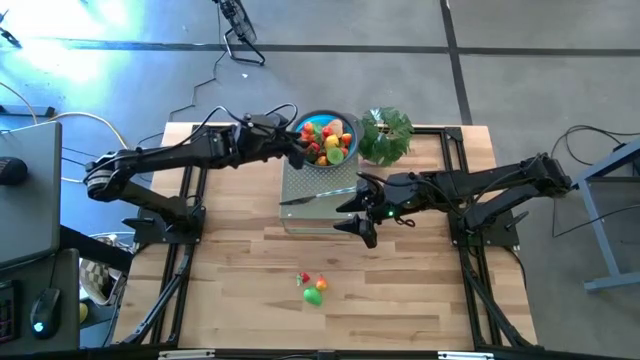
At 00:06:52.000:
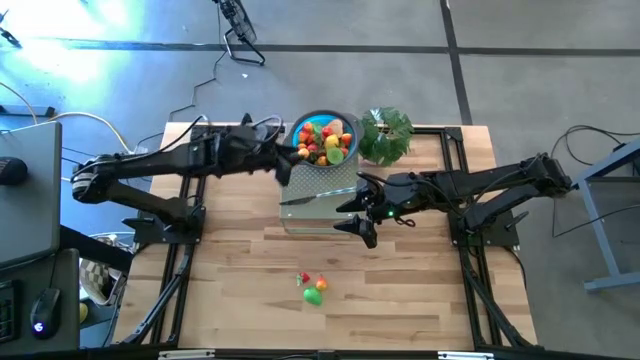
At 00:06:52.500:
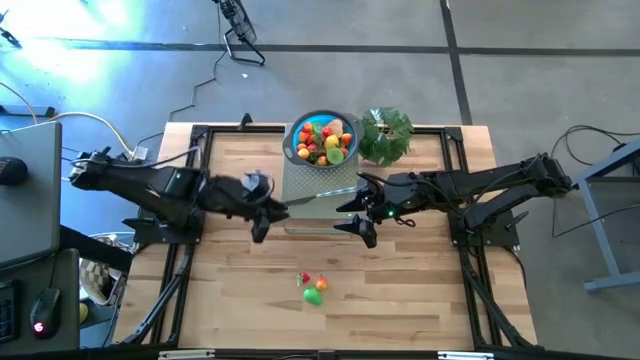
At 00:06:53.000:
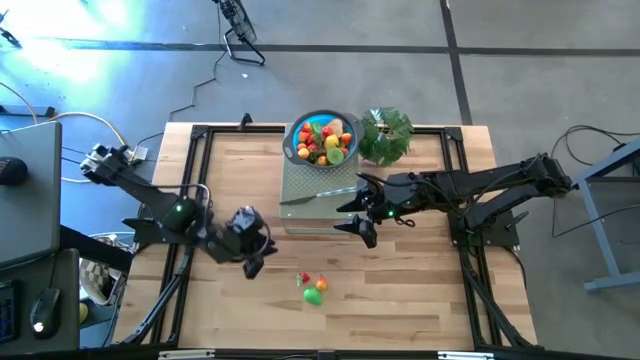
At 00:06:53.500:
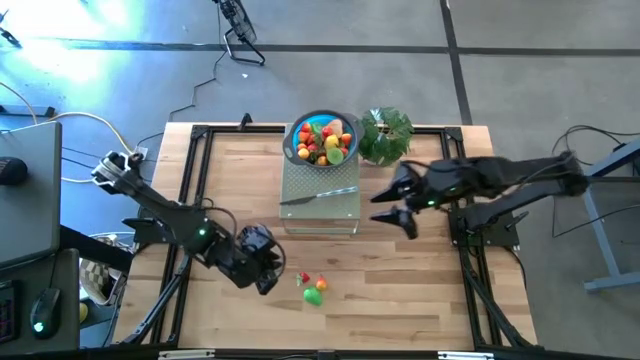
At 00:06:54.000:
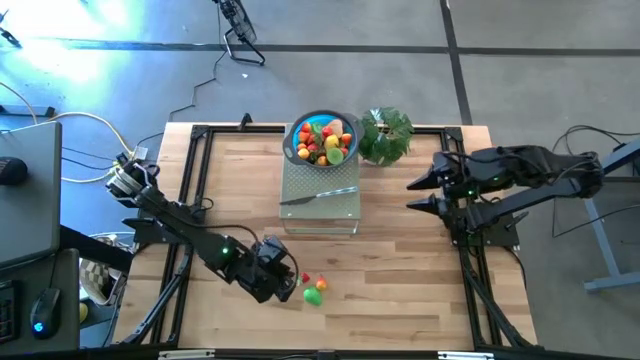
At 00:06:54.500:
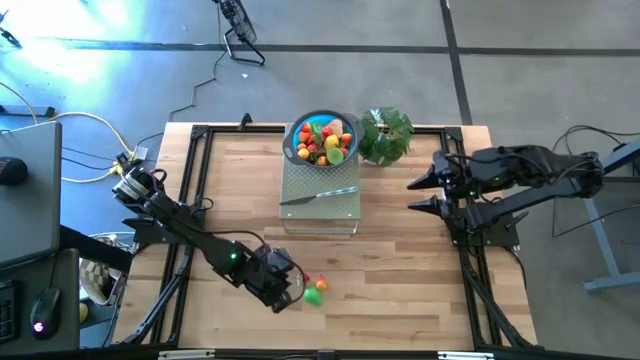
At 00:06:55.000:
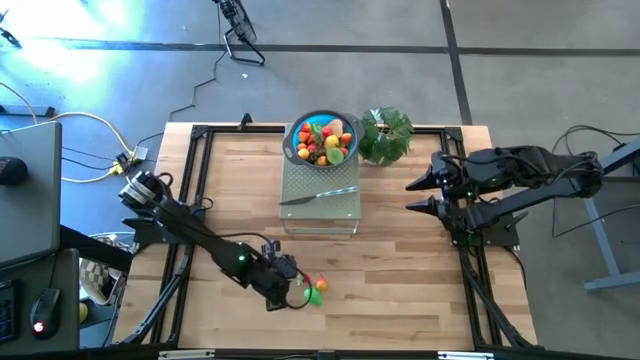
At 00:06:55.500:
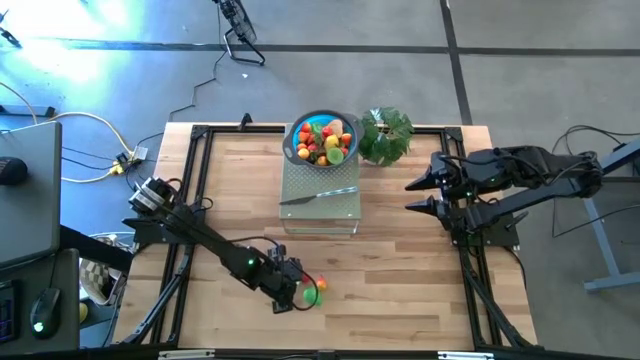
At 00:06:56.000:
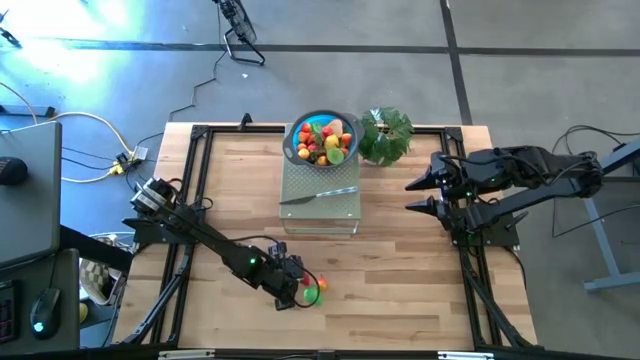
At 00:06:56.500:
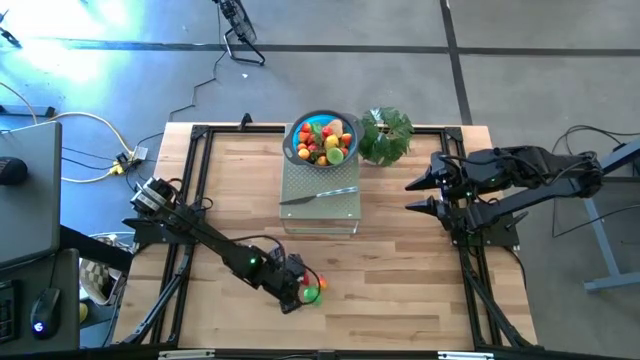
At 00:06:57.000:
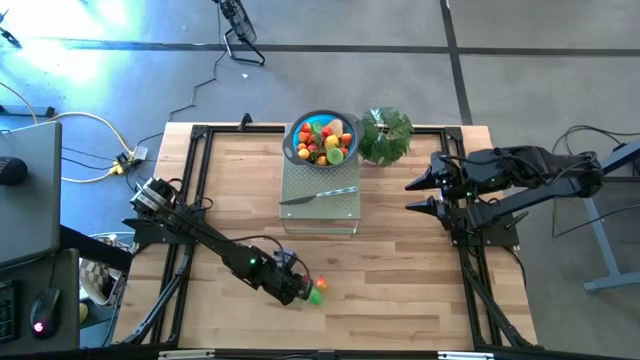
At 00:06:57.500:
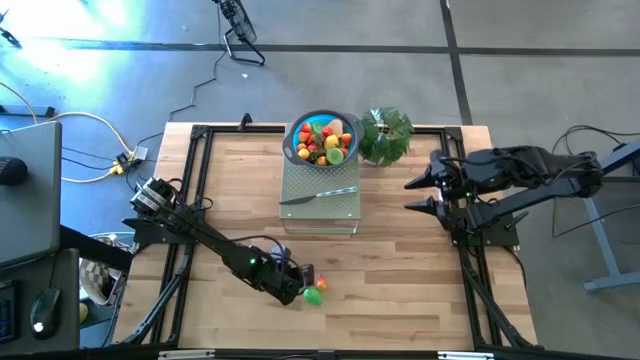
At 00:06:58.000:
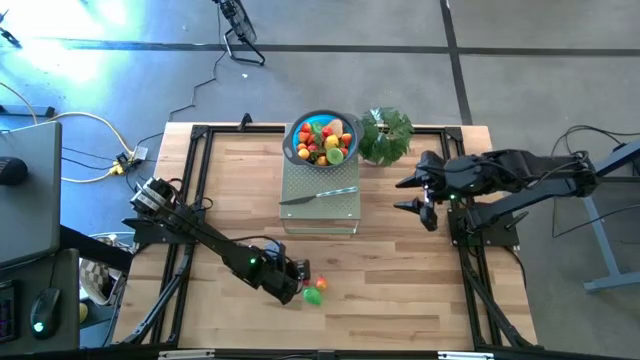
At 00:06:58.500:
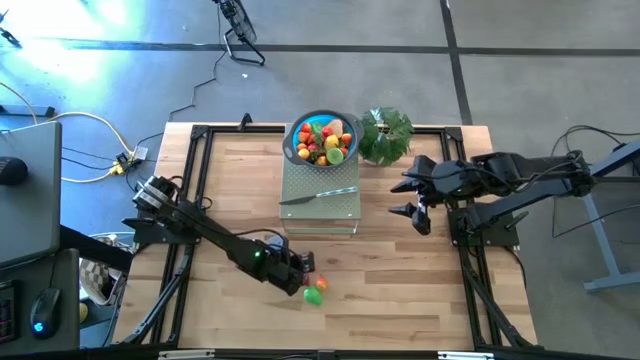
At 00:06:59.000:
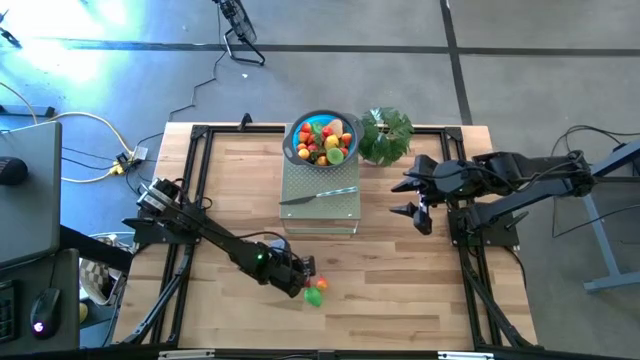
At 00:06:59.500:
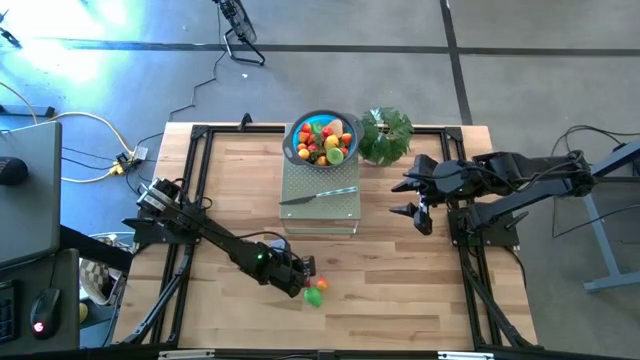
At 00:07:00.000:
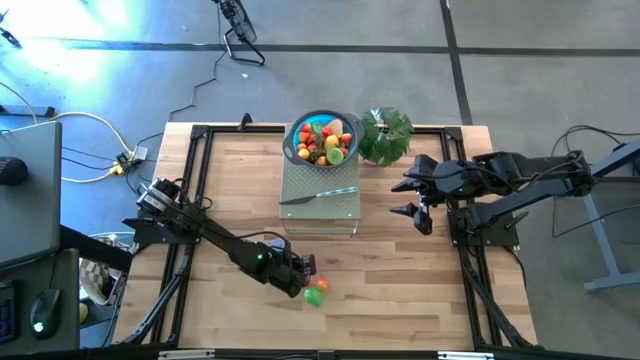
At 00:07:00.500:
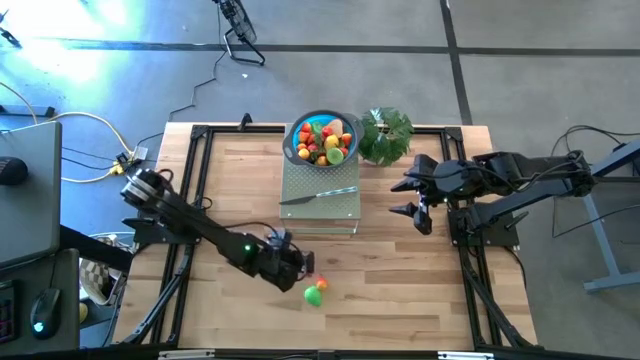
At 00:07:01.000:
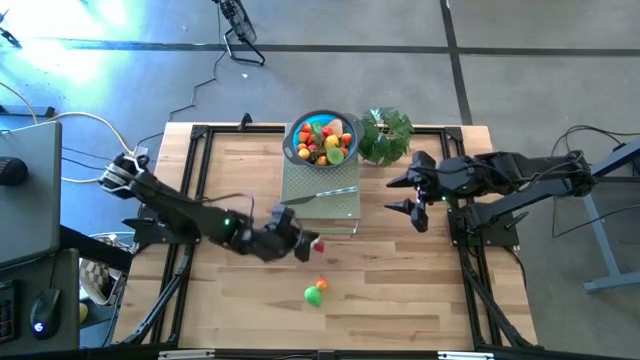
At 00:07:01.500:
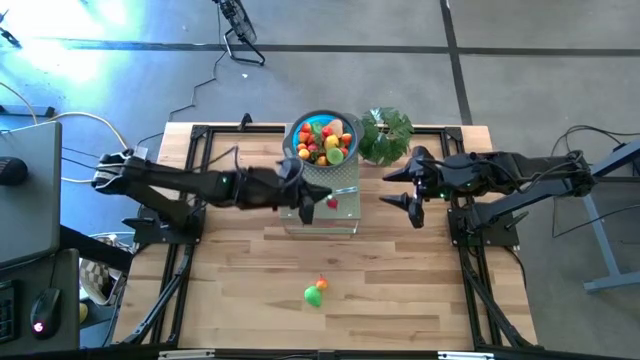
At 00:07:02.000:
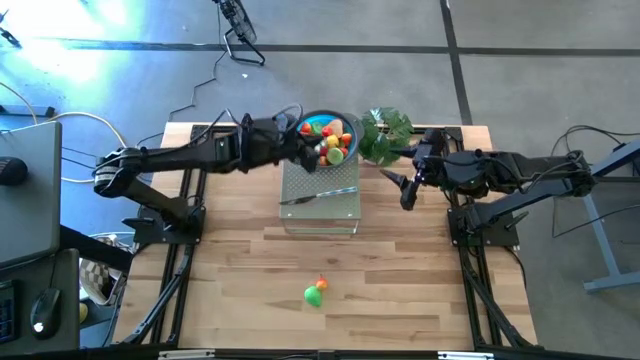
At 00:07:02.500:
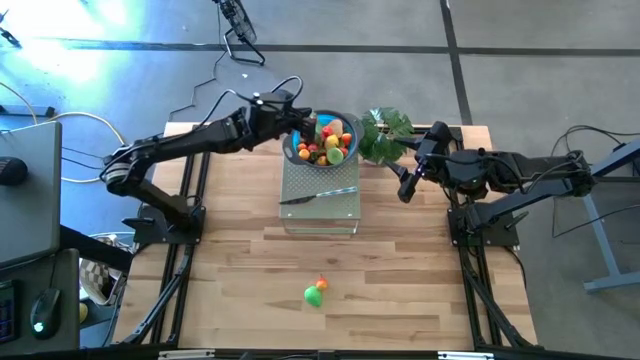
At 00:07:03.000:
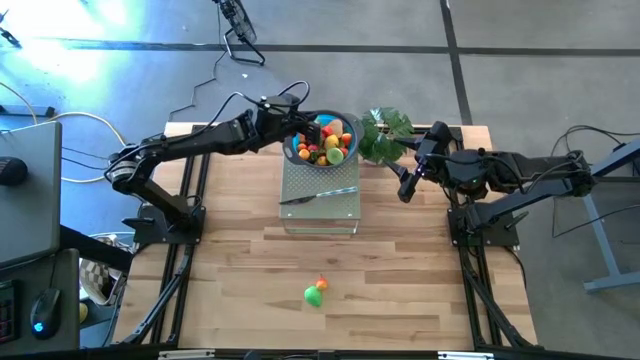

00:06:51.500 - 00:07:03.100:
Task: Pick & Place Fruit
Put the red strawberry in the blue bowl on the shelf

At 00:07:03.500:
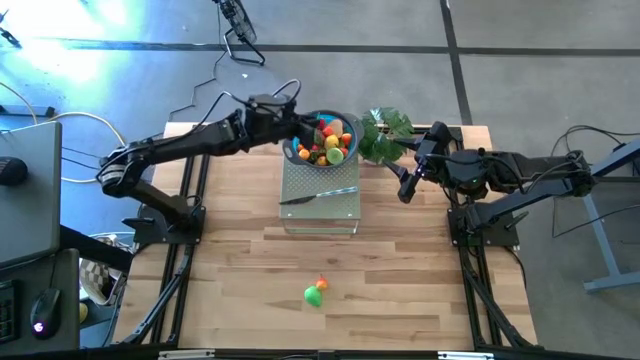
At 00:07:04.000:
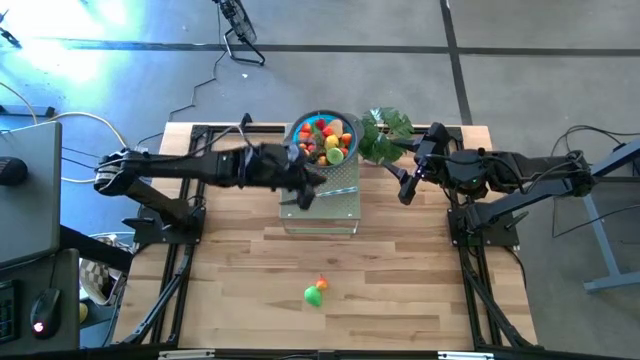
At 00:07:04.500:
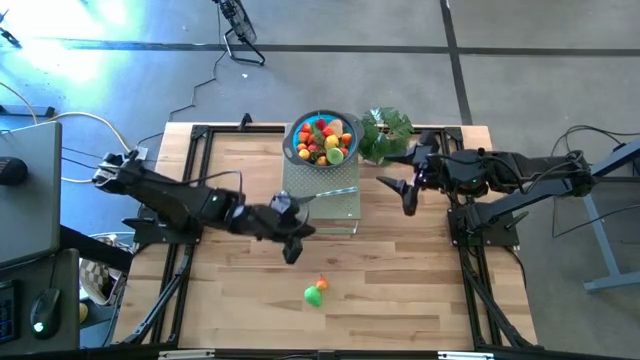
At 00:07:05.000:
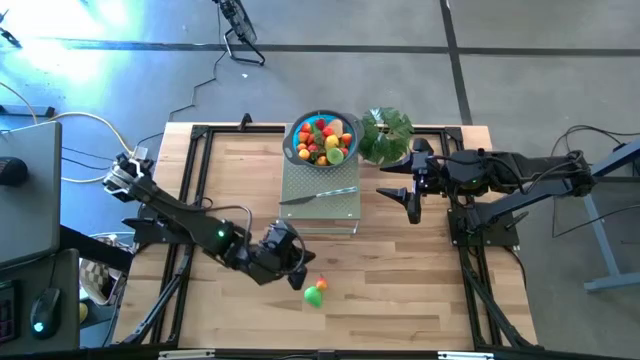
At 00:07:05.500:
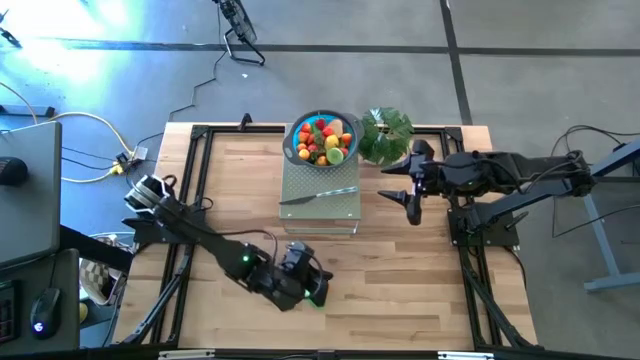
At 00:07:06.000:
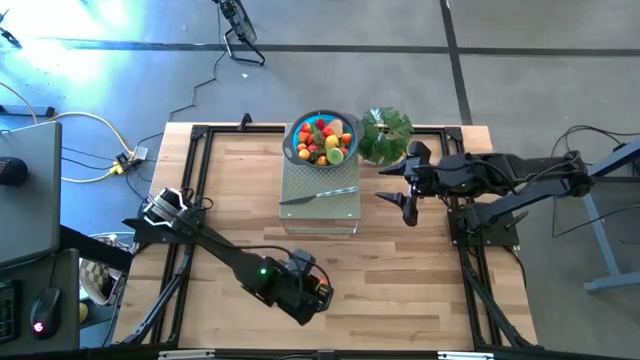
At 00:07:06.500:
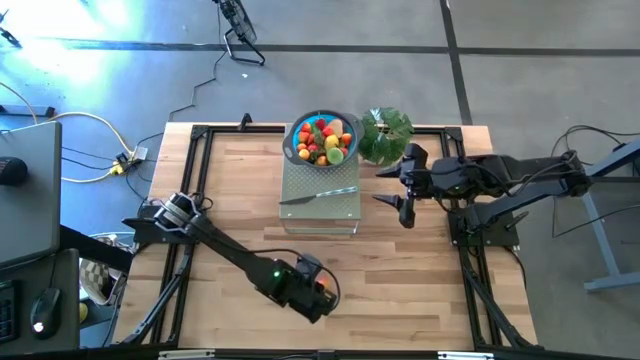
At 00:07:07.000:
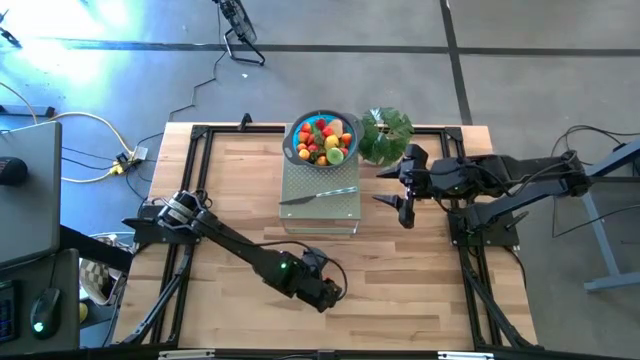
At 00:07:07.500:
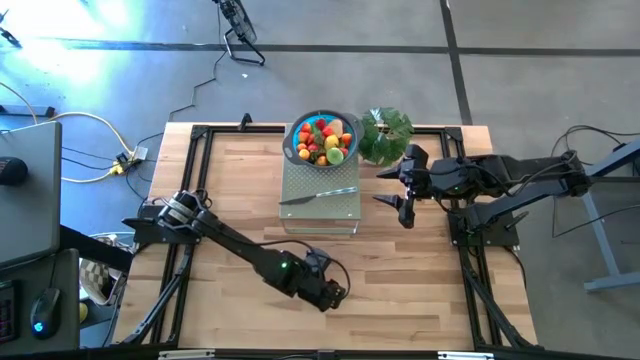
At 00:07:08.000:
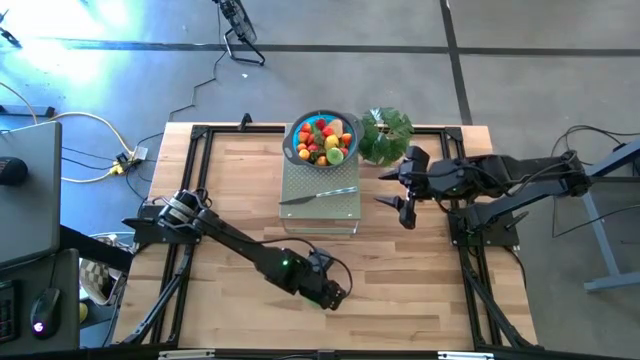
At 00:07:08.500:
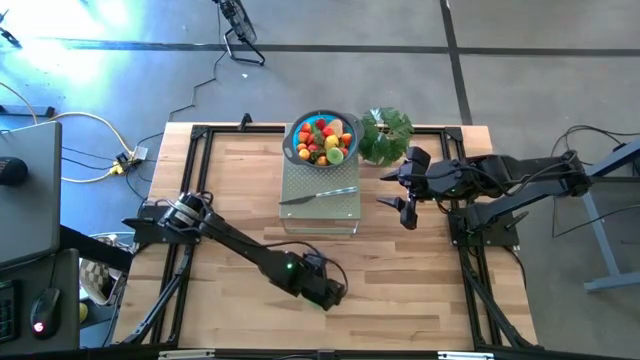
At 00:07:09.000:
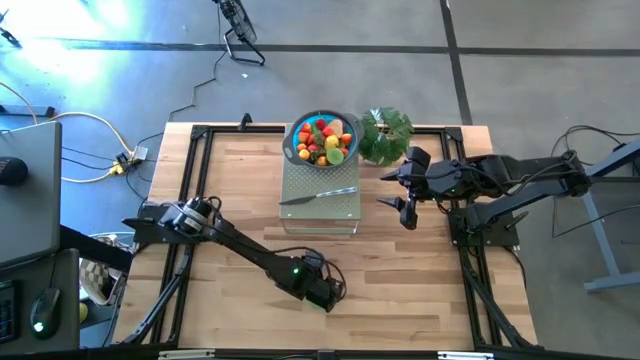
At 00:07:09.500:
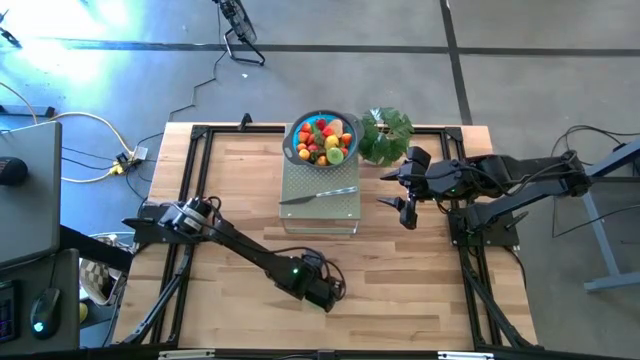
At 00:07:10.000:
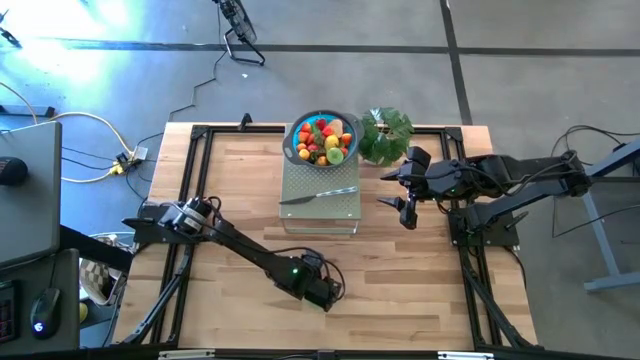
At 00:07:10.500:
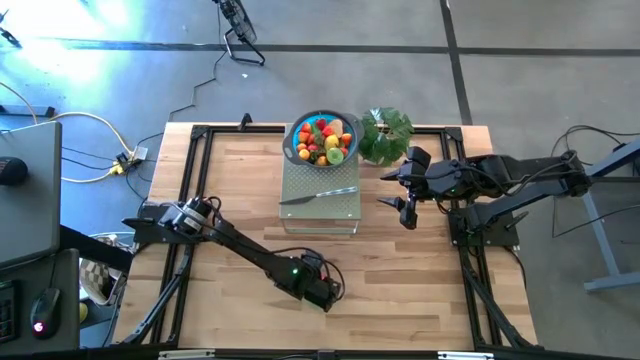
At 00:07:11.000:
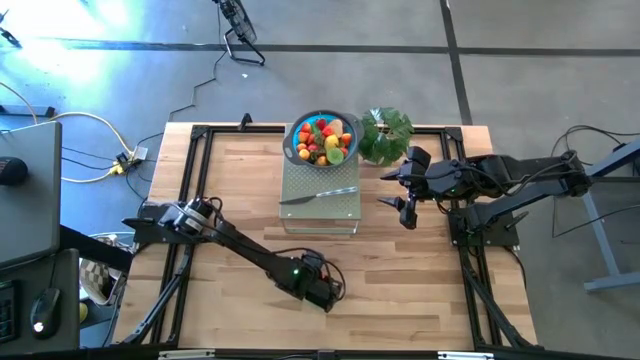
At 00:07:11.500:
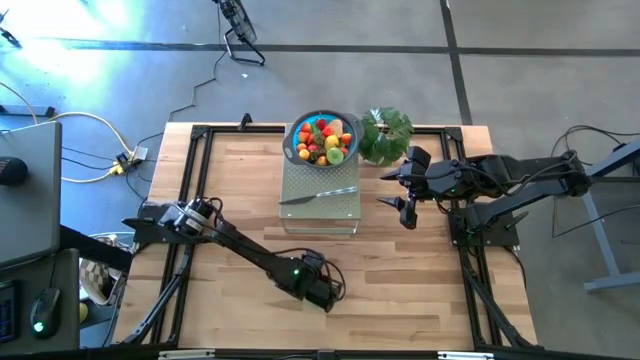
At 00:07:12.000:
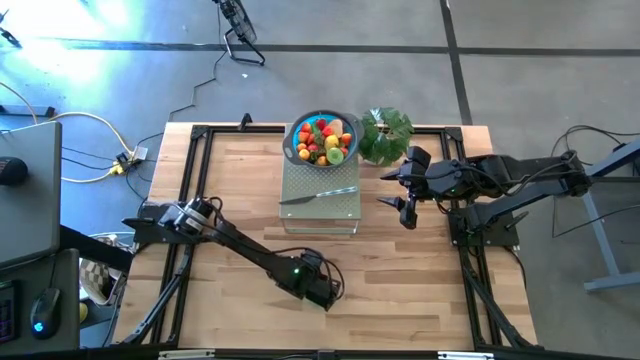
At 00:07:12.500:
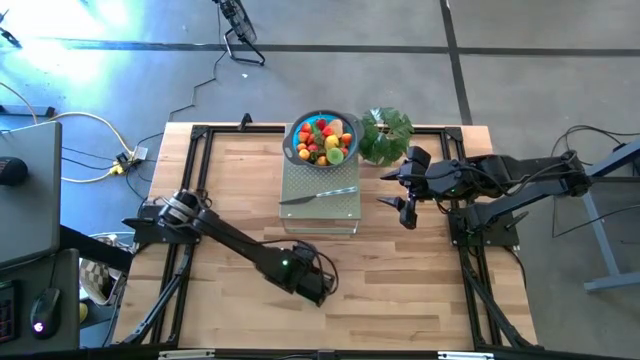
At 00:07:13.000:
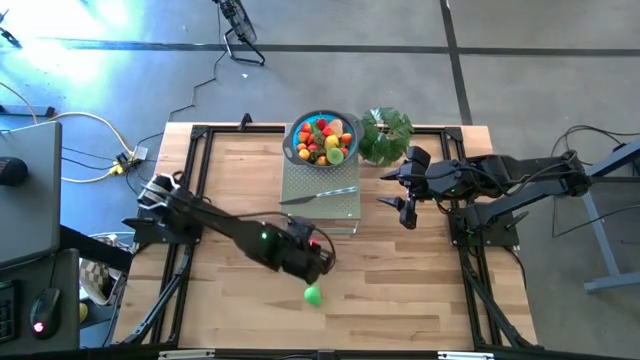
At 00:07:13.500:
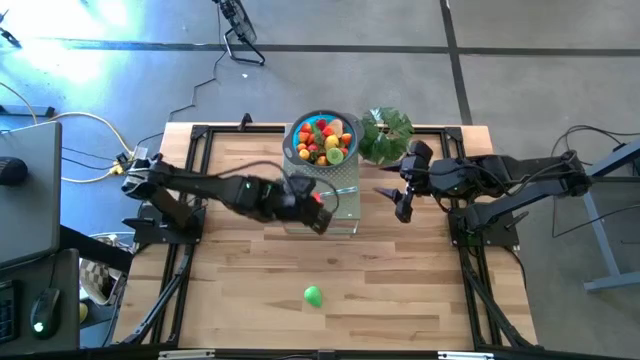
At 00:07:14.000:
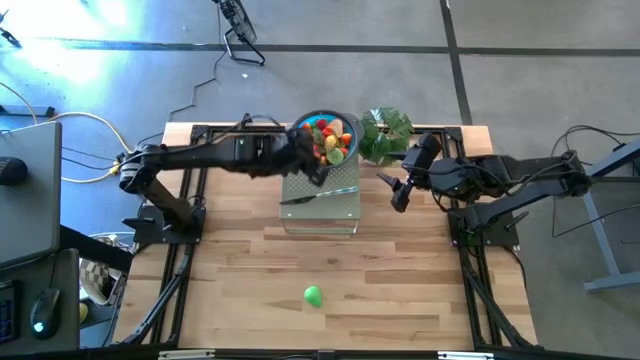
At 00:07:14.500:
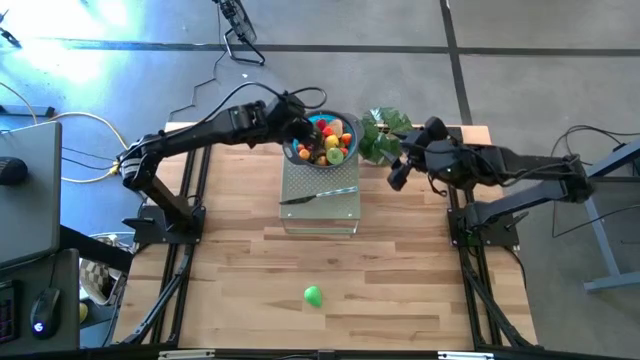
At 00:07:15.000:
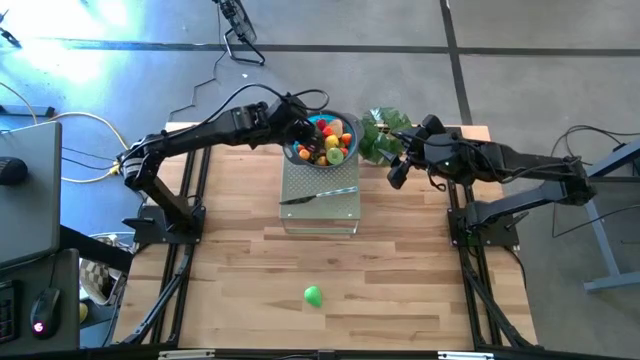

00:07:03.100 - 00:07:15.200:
Put the orange peach in the blue bowl on the shelf
